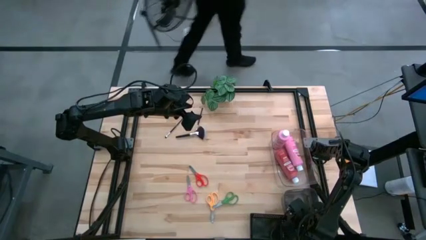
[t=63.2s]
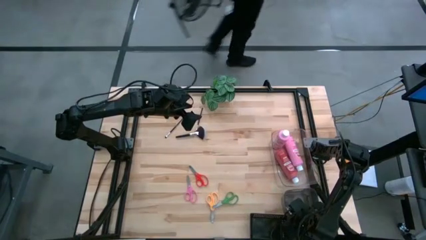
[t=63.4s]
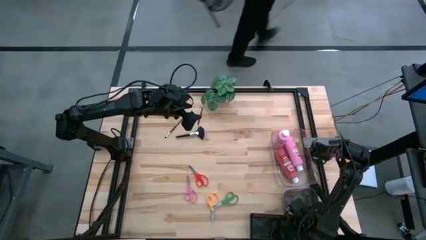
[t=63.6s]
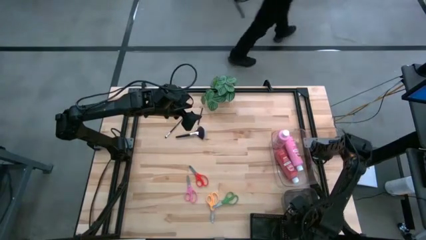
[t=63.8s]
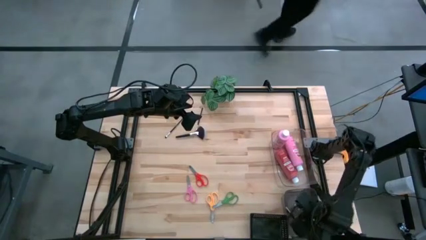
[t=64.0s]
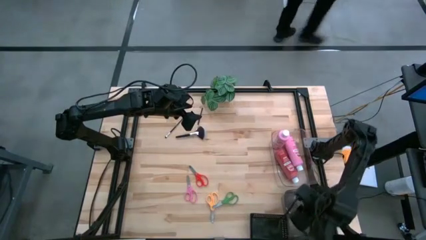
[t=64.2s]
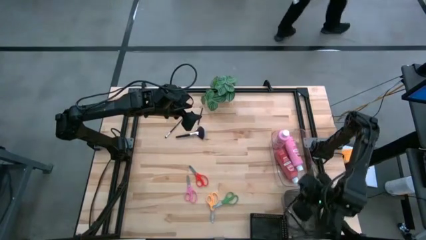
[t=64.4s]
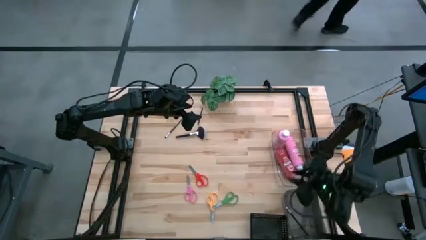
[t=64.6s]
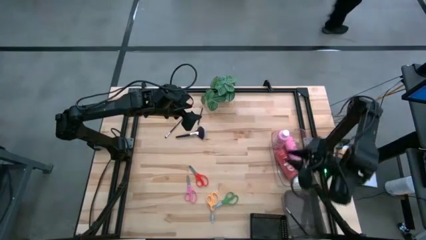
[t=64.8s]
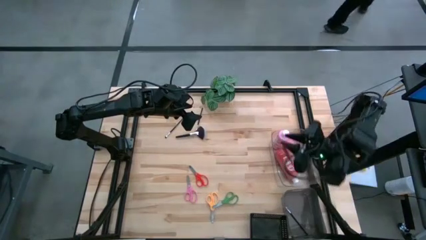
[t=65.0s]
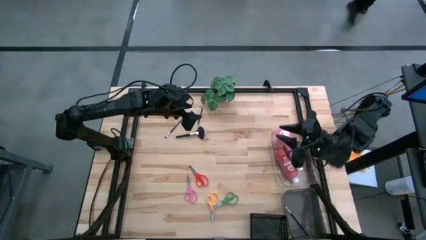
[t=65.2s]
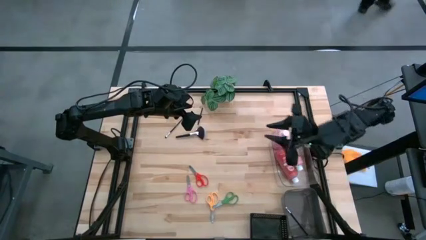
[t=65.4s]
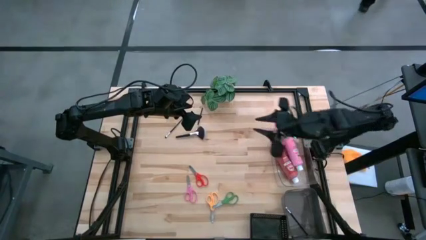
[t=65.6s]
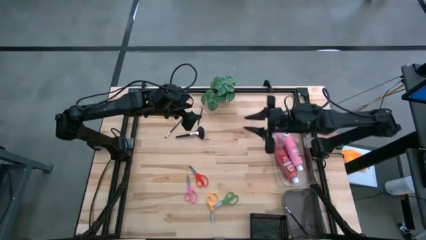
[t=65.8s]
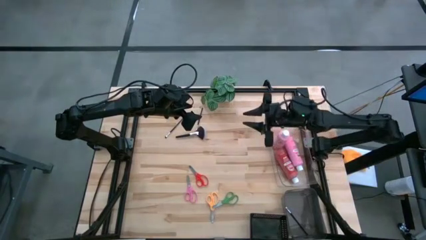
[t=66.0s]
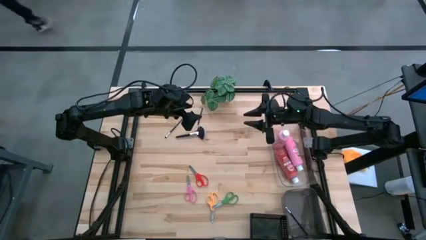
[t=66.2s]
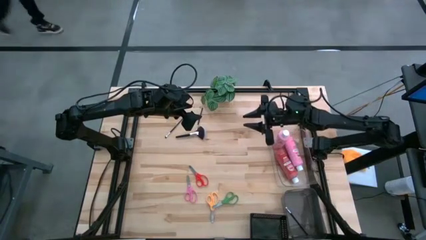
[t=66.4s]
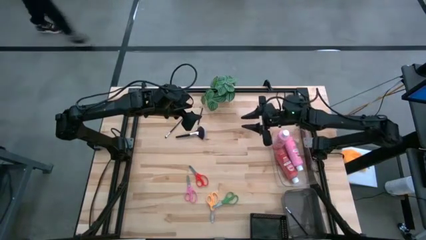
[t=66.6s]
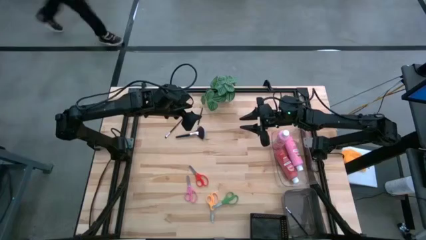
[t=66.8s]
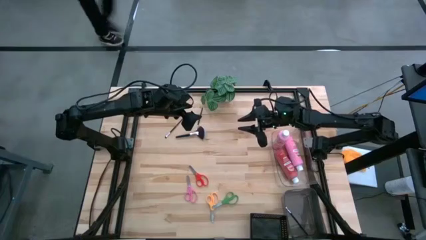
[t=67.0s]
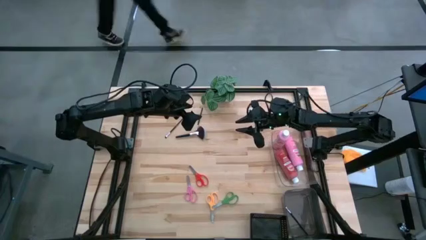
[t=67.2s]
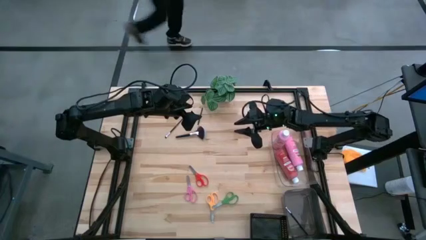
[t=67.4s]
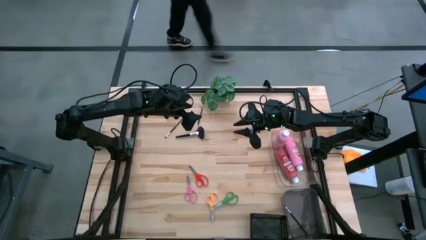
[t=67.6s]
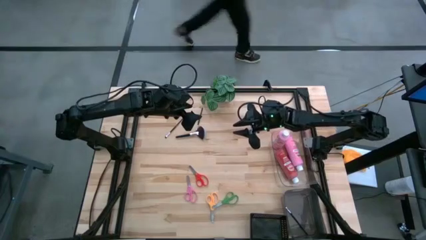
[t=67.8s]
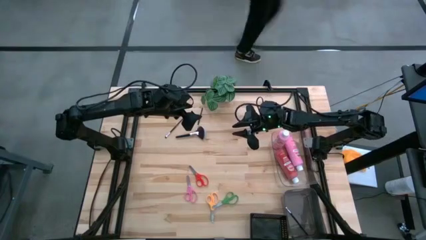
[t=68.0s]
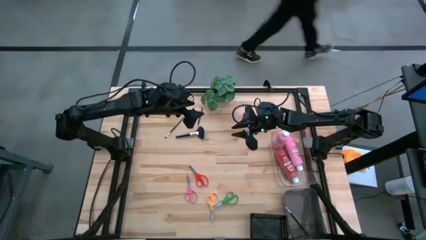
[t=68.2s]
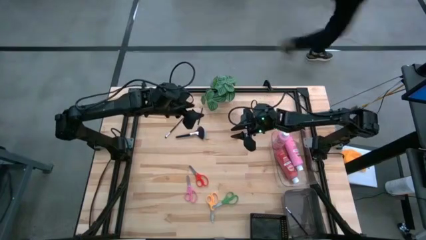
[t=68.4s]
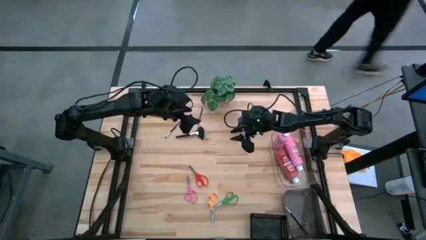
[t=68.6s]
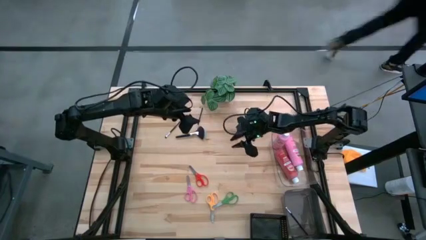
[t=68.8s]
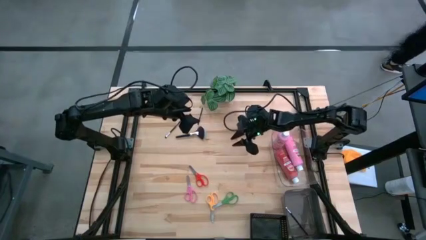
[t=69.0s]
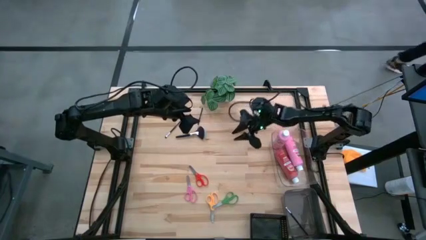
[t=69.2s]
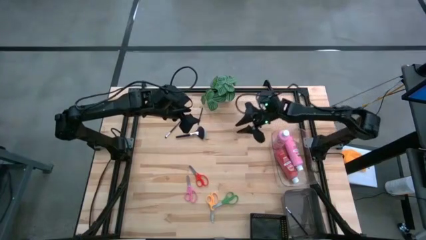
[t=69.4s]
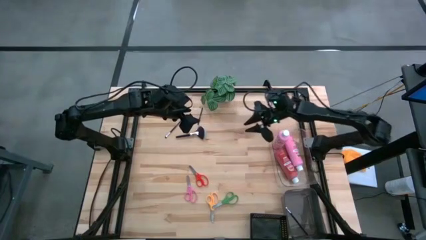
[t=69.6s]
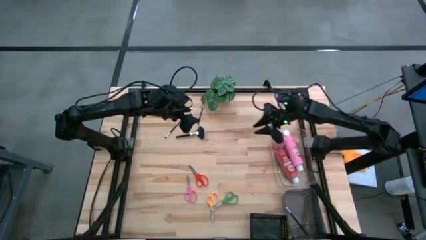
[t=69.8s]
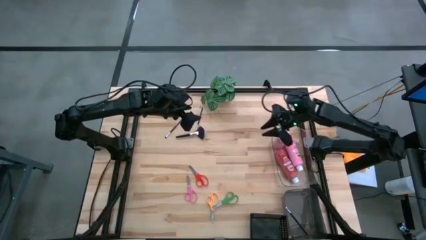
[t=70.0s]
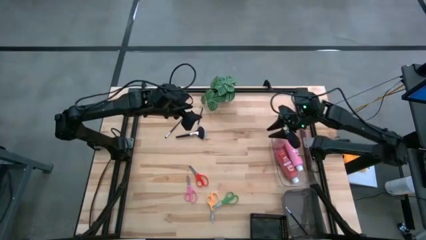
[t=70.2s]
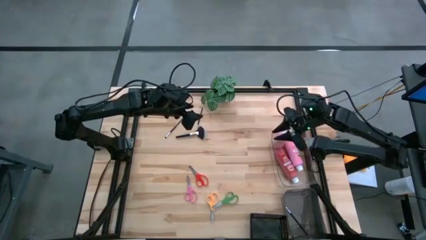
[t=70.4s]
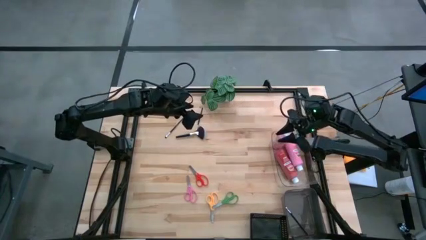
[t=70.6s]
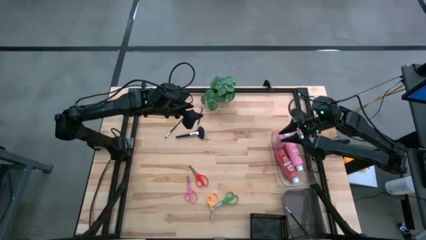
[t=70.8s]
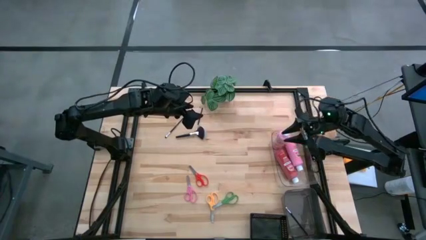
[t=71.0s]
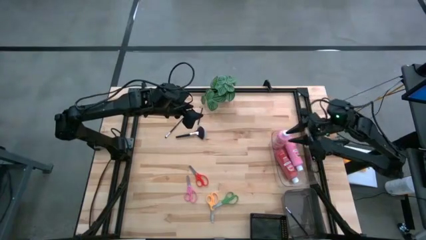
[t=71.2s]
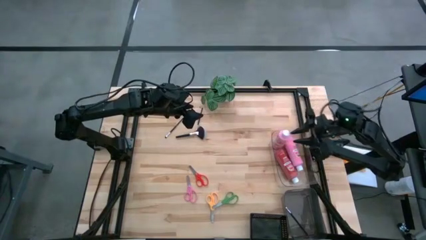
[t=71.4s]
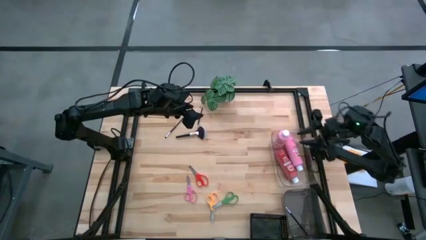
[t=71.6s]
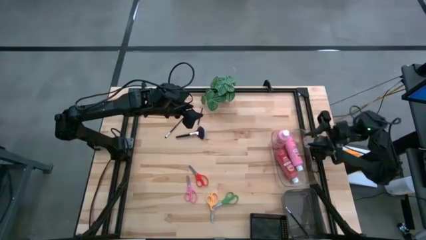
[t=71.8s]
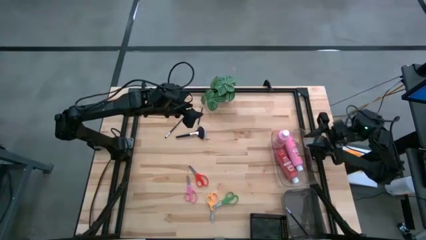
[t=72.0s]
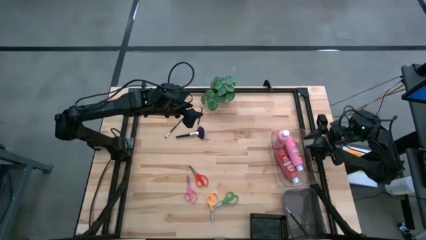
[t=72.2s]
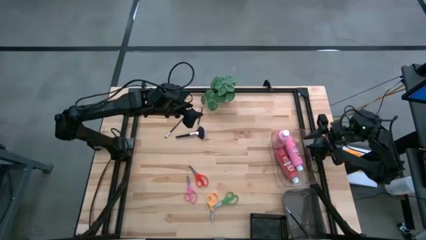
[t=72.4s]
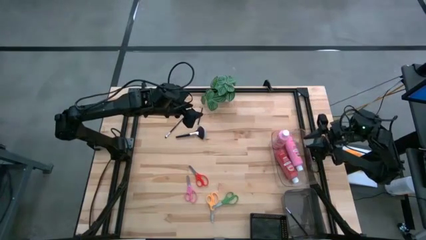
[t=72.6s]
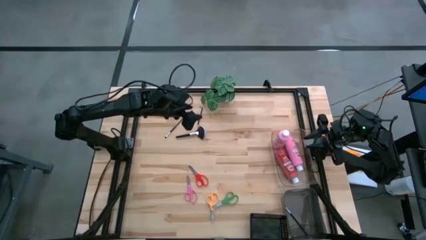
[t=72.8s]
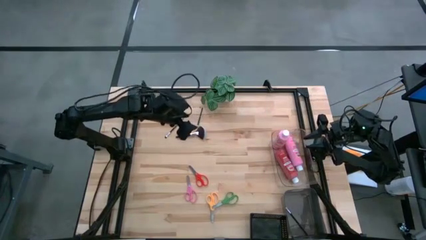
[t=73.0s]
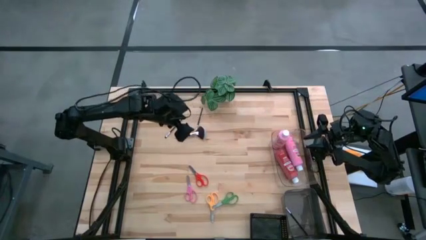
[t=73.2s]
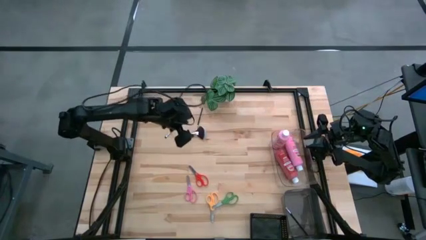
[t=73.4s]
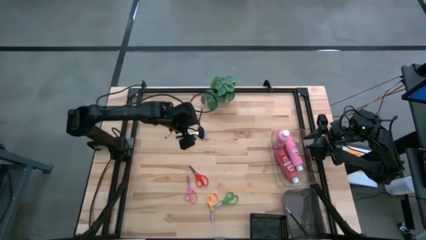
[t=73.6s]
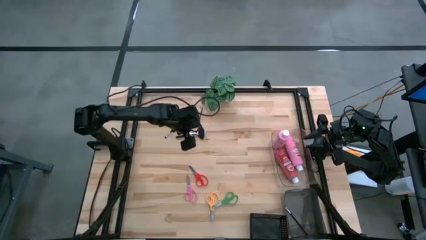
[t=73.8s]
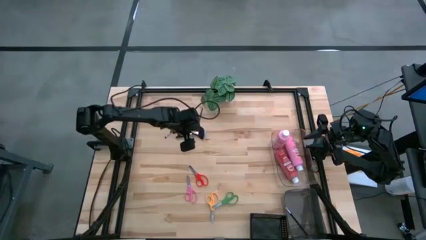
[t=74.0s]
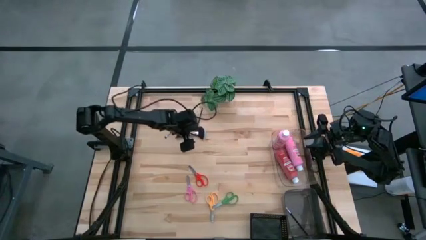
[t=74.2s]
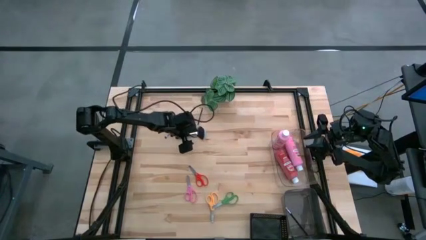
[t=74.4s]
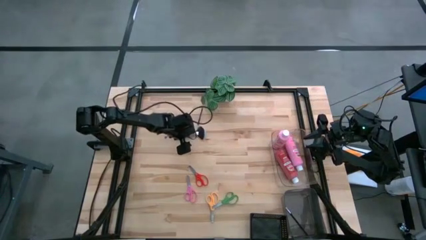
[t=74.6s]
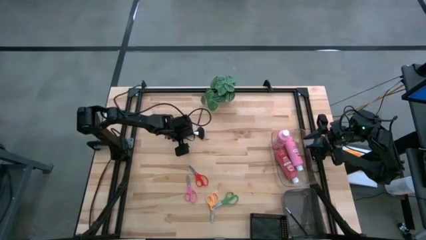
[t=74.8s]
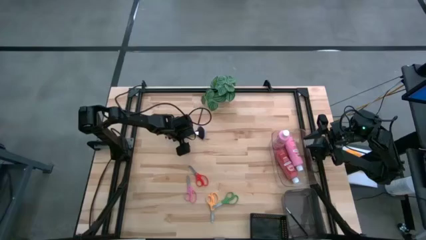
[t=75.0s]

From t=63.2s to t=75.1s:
Task: Pick & Place Paint Supplies
Put the black paint brush into the gray bin
